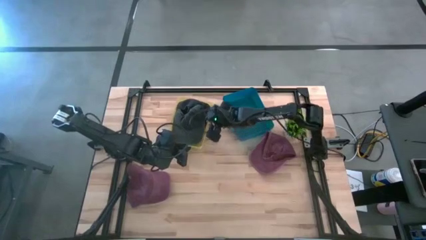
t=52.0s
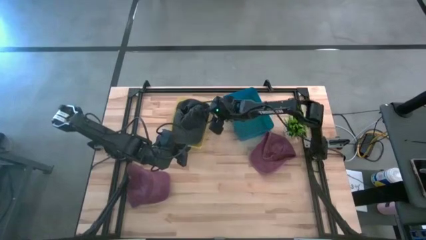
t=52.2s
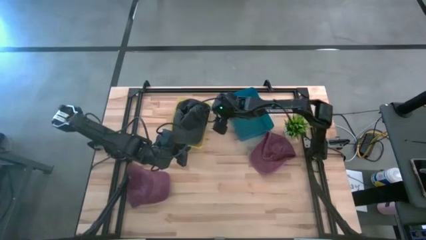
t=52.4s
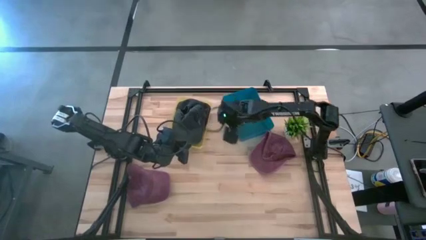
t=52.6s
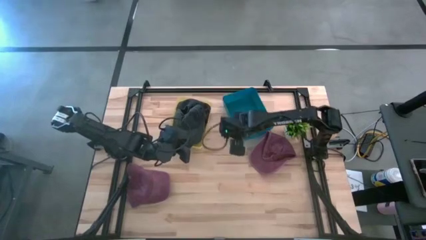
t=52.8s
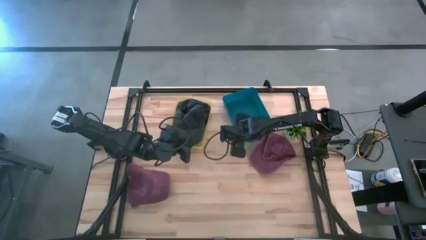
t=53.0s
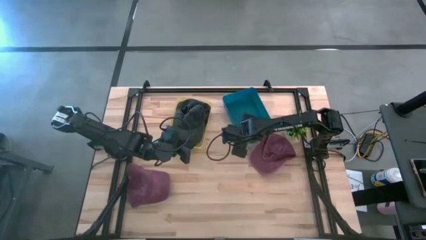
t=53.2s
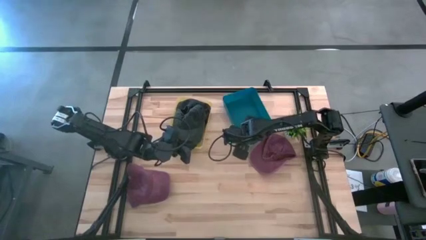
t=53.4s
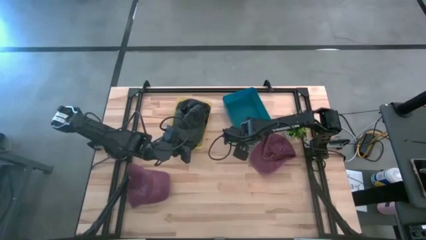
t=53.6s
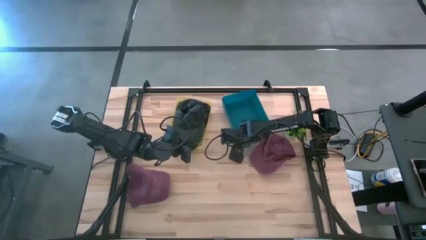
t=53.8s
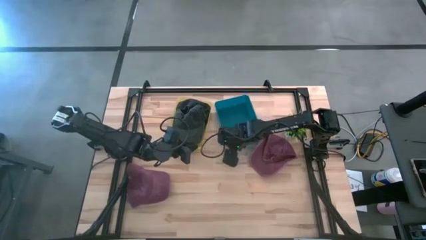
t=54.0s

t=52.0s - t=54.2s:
Task: Pick & Place hat
Adjust the blue bin

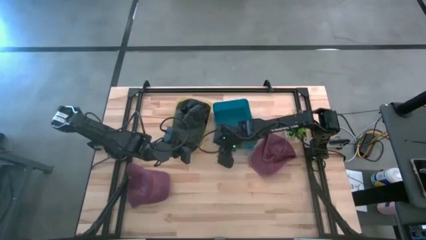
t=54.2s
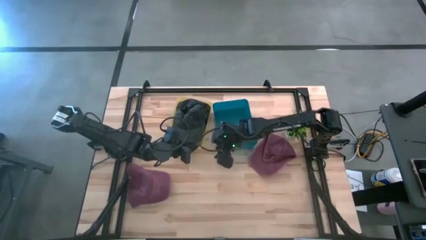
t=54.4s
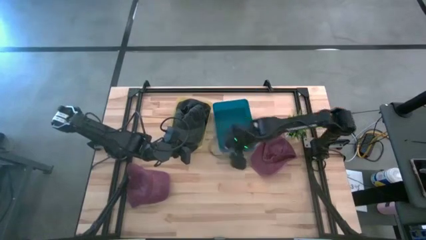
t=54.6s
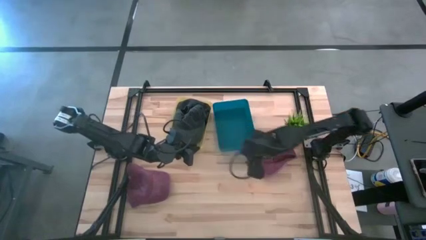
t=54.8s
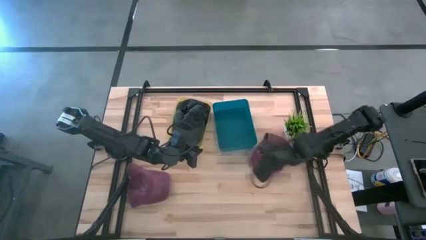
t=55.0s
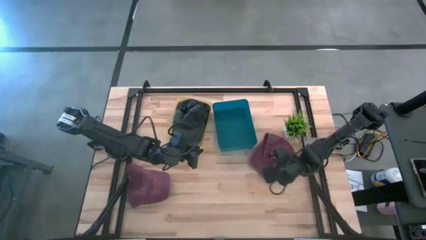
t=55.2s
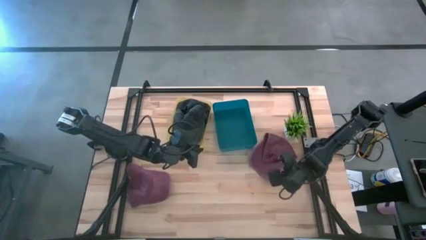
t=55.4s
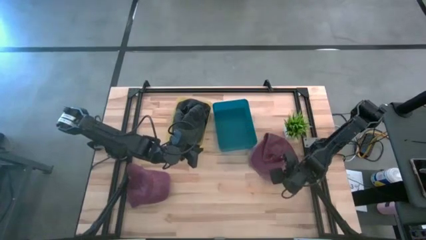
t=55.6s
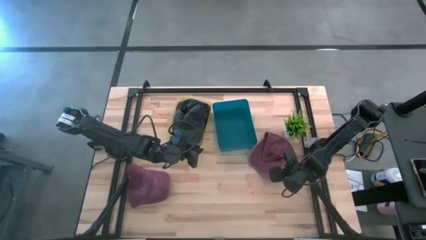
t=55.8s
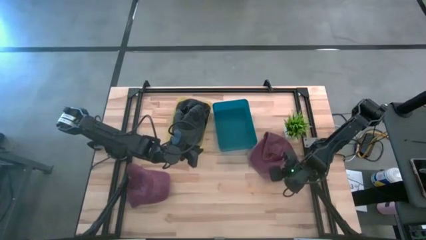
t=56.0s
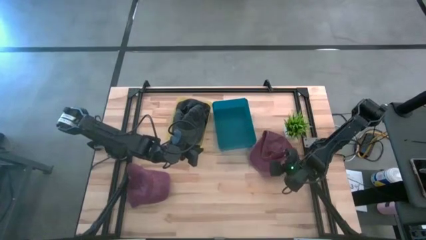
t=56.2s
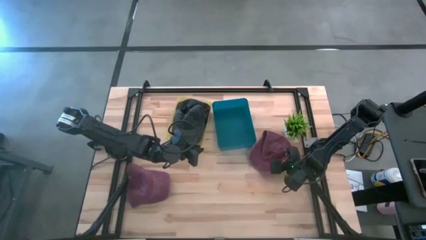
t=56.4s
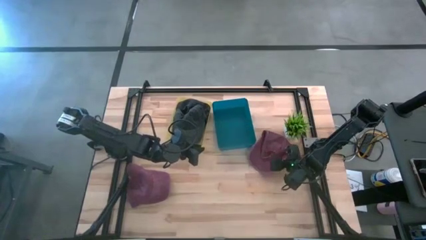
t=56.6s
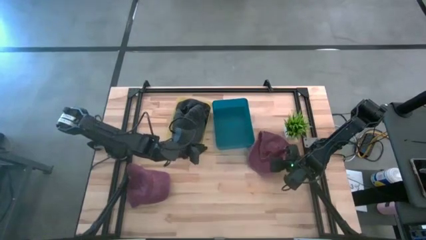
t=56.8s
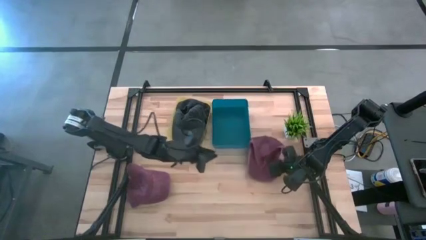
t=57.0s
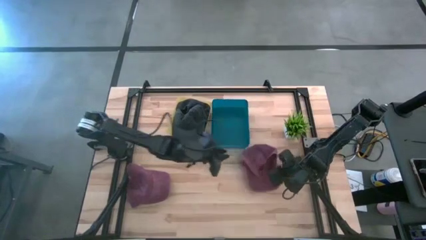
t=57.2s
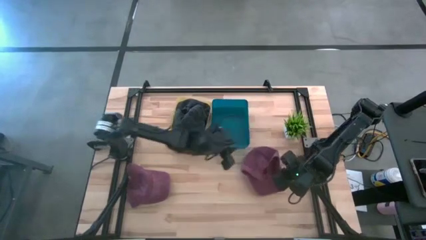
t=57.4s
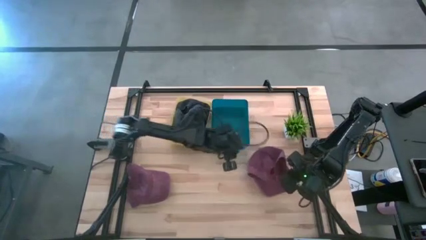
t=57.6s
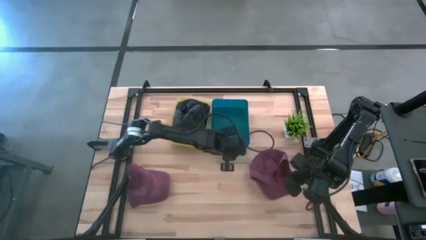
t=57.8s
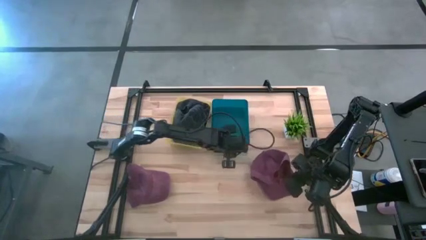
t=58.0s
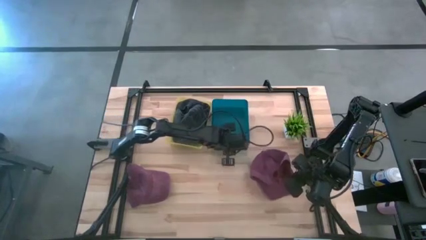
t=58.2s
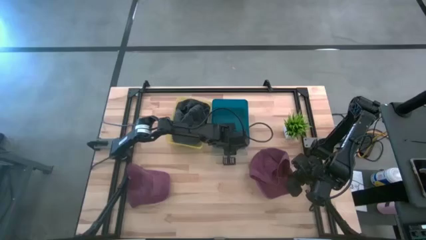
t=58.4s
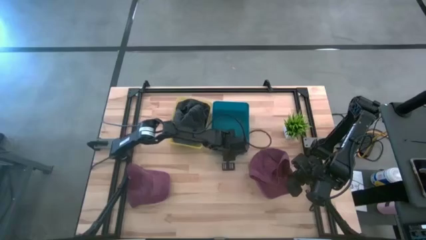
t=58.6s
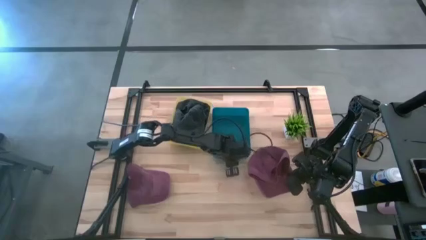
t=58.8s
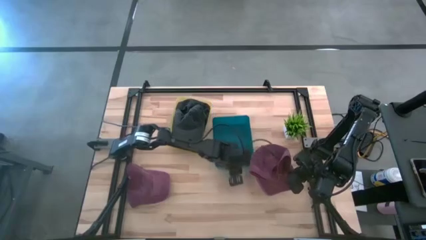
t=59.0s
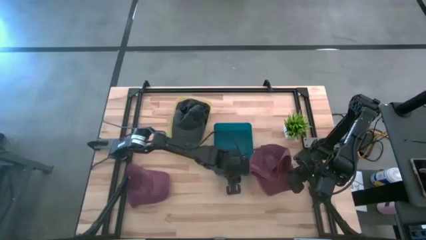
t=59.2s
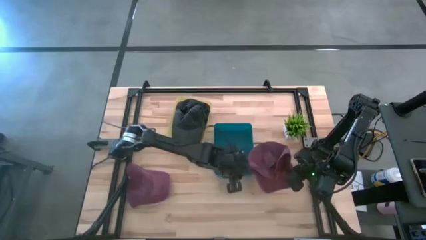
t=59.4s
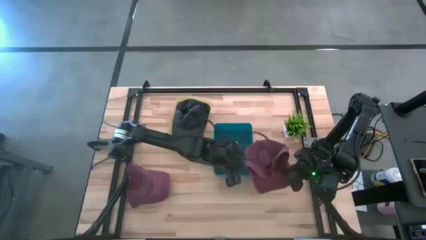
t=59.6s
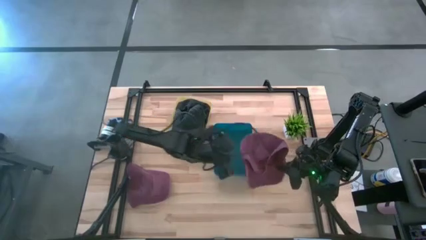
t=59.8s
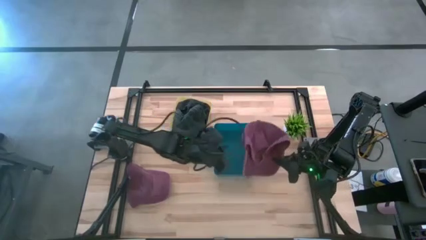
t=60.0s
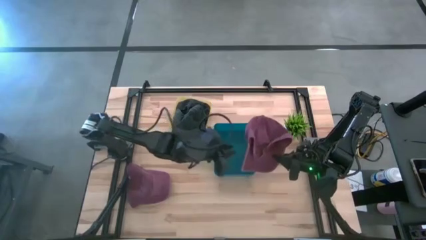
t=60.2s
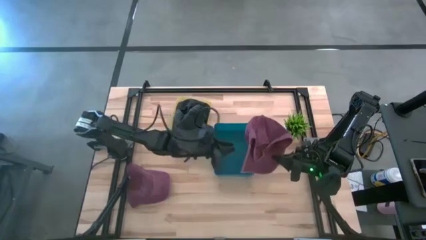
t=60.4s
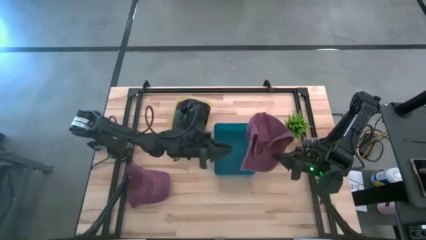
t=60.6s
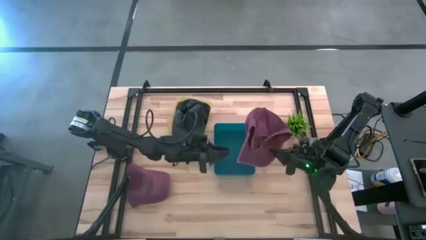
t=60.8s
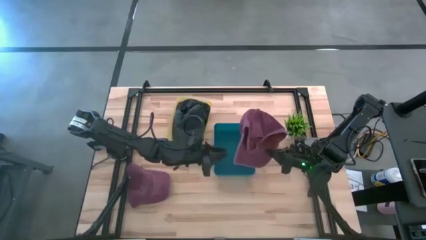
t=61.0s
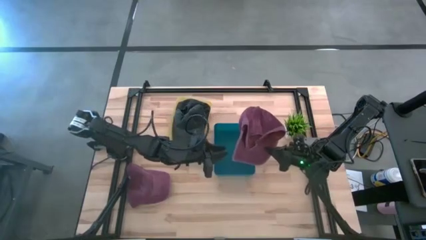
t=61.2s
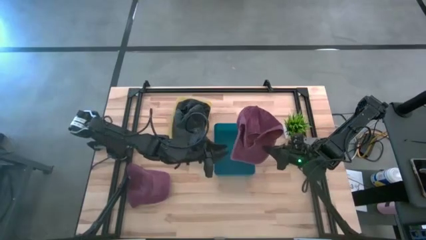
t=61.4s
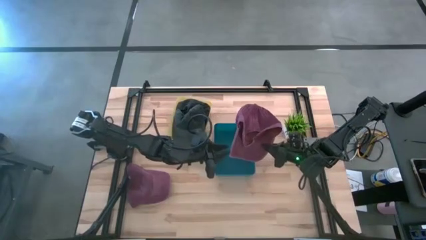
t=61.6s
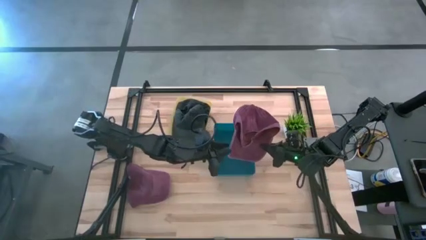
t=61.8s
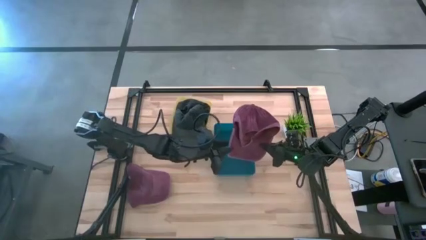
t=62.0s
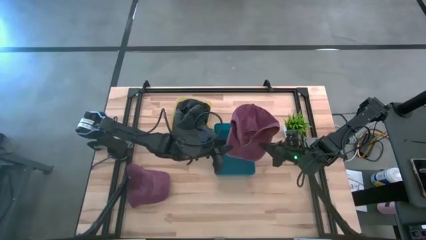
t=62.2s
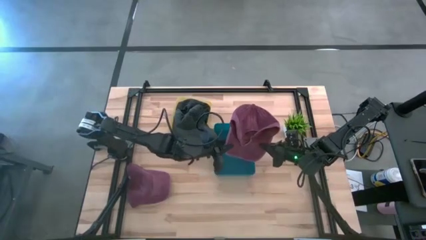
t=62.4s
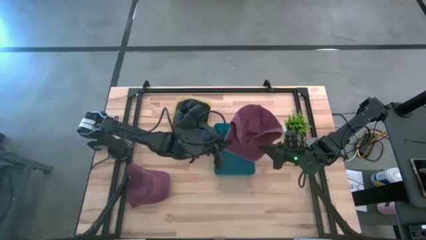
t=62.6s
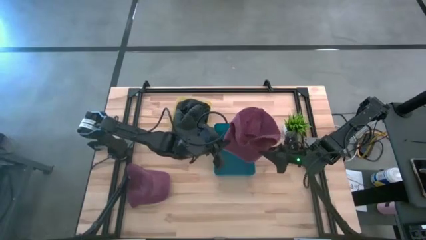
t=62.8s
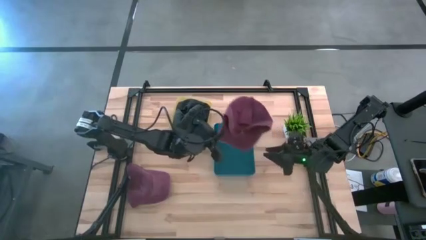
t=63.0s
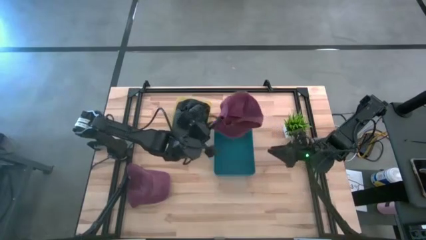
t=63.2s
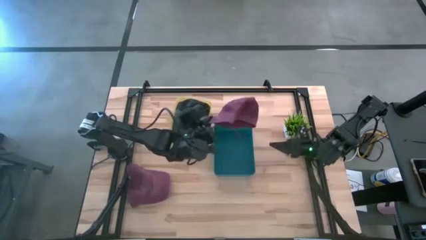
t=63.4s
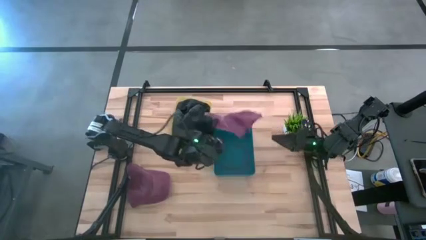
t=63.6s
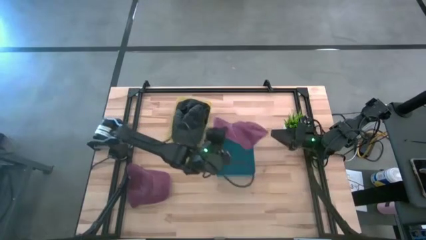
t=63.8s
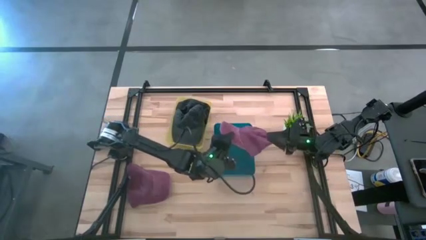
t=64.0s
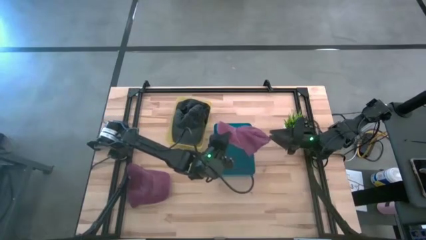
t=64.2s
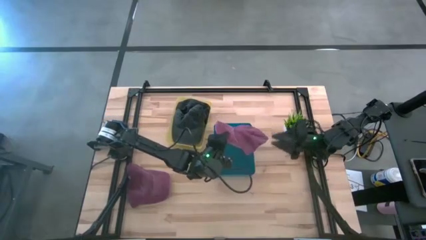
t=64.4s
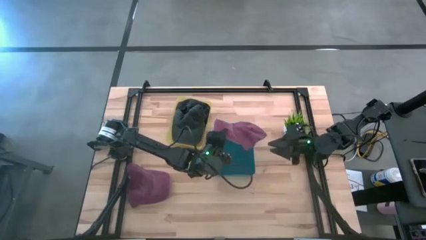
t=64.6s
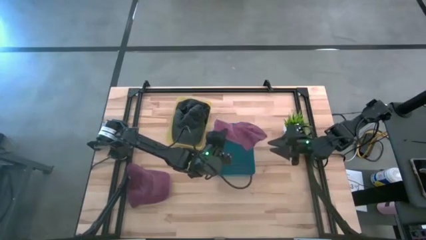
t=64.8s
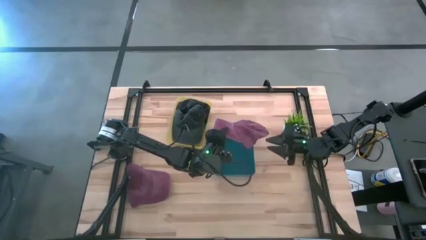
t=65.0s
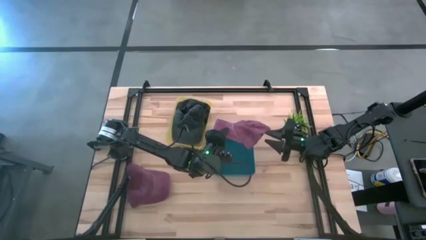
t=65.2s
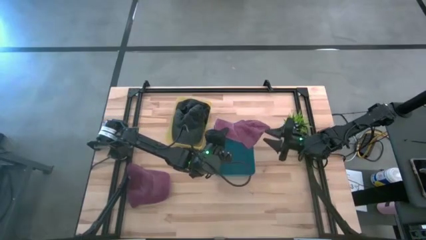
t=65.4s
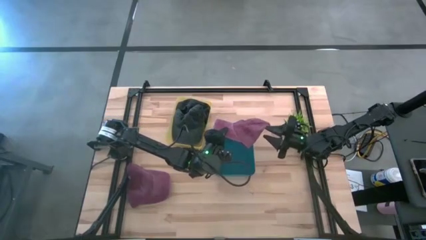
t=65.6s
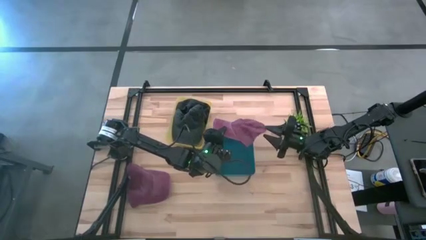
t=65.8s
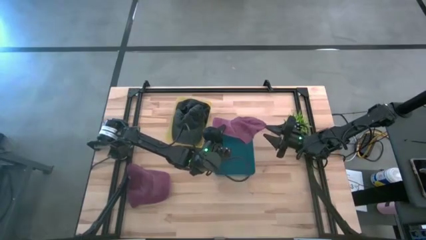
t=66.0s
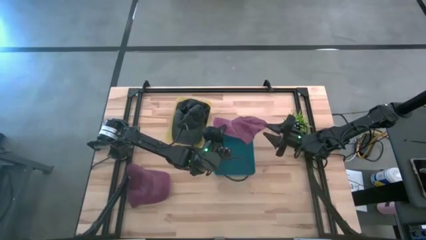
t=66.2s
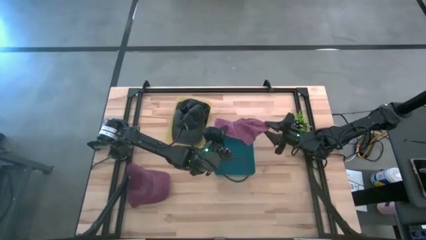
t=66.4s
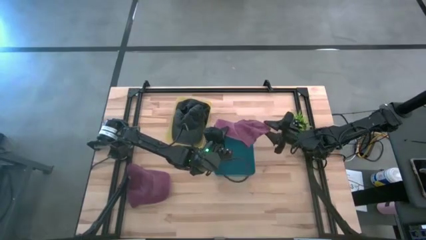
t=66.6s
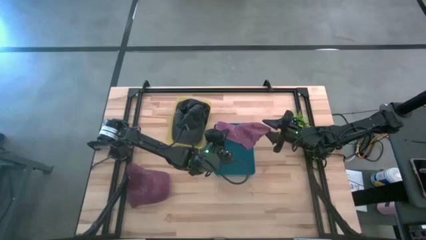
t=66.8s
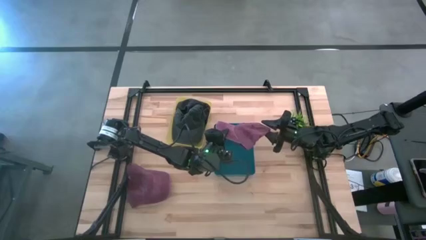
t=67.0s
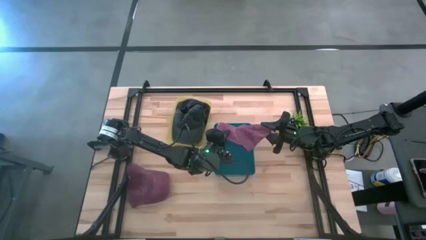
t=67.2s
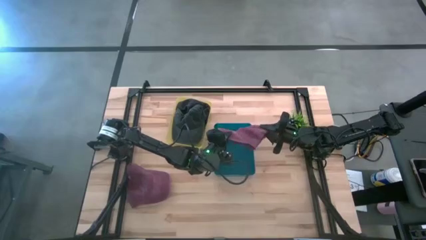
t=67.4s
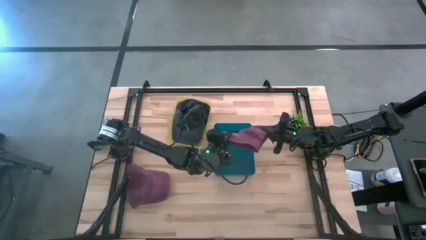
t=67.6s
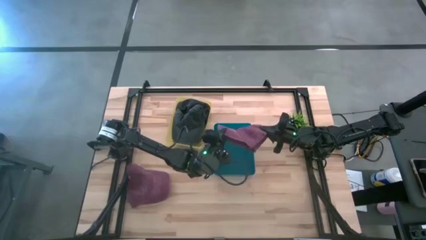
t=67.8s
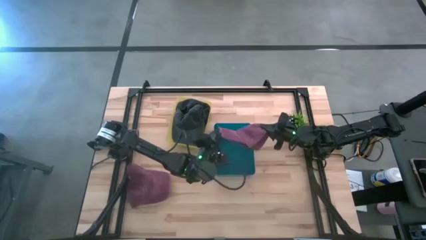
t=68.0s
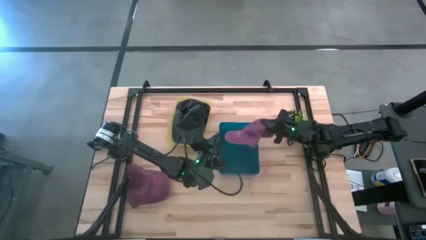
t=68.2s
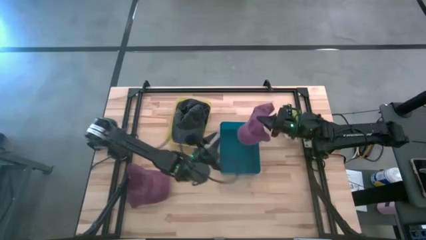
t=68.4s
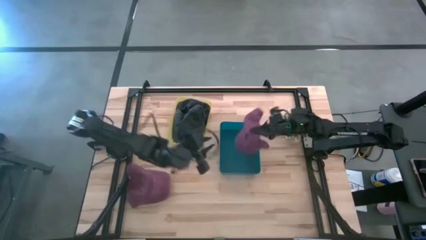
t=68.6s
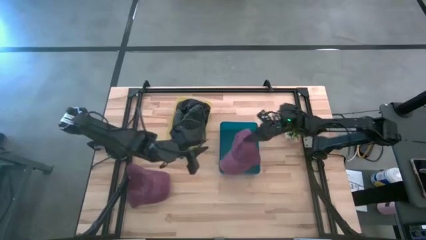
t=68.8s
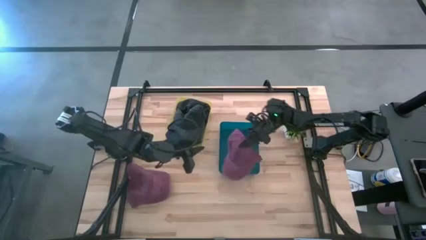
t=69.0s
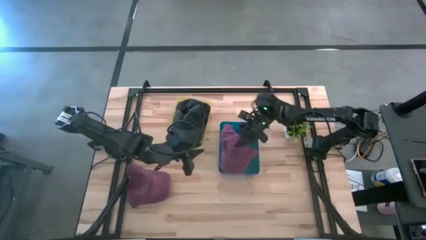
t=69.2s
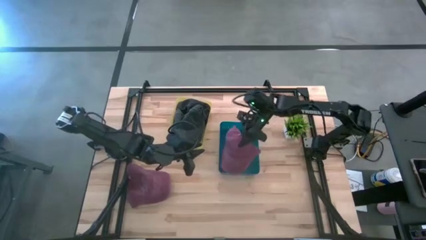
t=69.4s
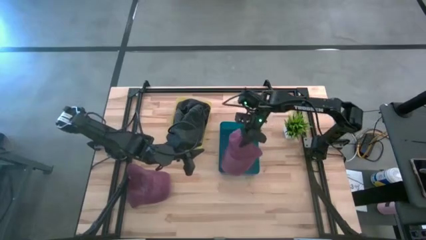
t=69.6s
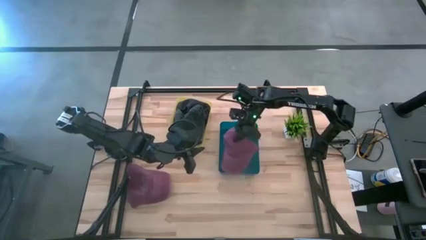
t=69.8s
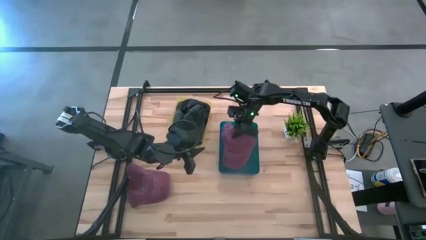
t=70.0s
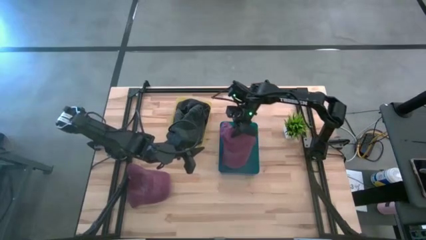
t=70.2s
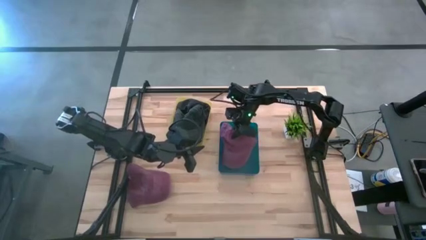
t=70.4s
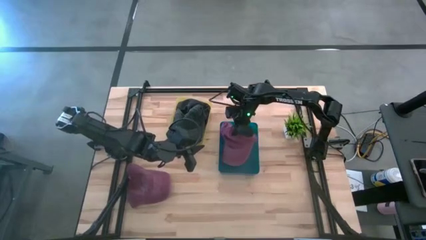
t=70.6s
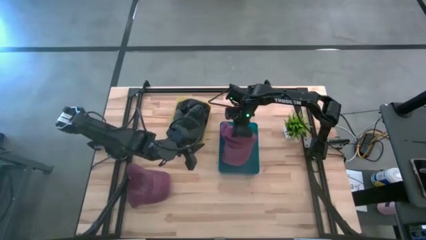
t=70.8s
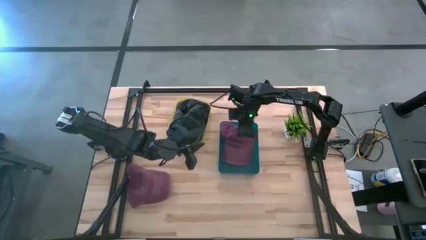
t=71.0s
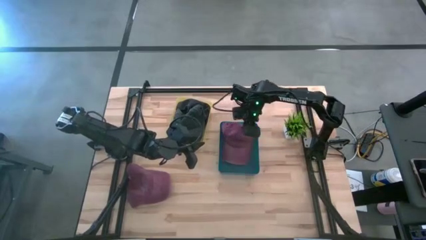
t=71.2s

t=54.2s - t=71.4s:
Put the top red cap into the blue bin
